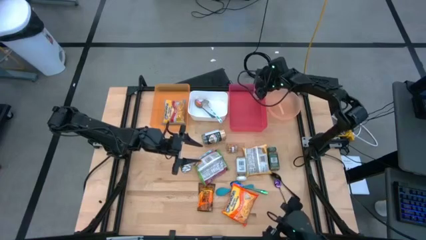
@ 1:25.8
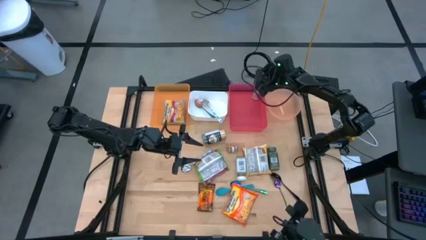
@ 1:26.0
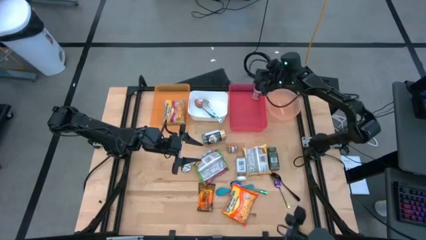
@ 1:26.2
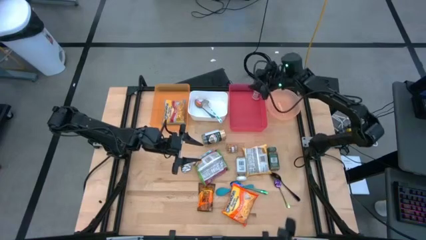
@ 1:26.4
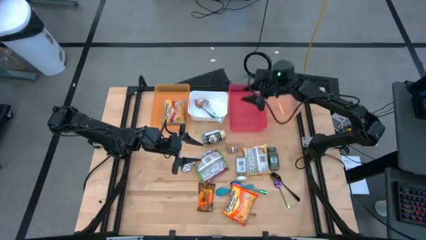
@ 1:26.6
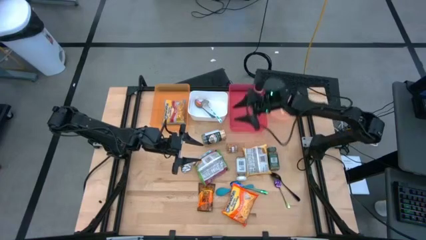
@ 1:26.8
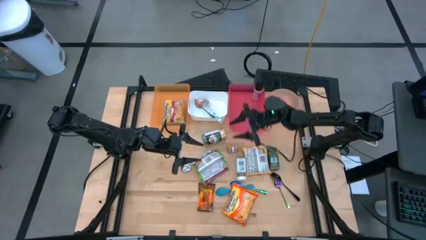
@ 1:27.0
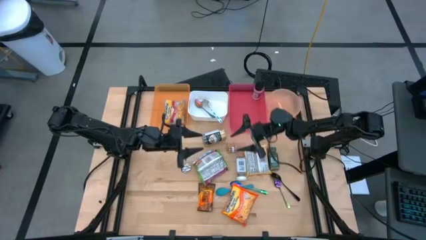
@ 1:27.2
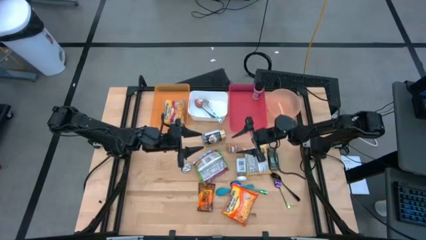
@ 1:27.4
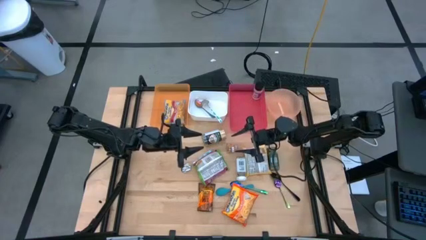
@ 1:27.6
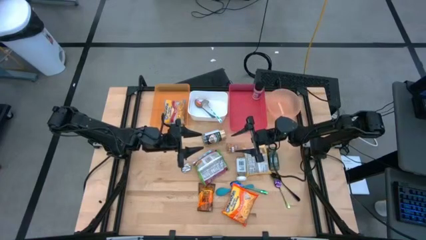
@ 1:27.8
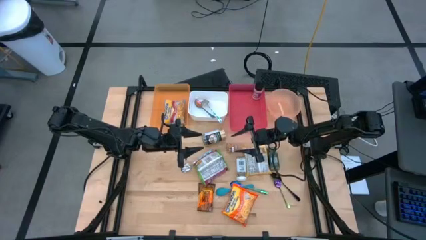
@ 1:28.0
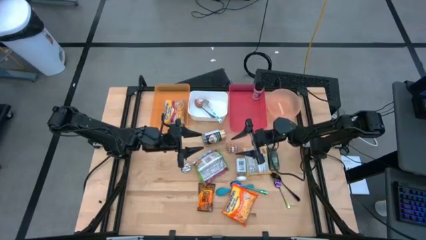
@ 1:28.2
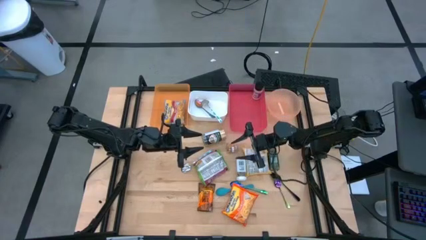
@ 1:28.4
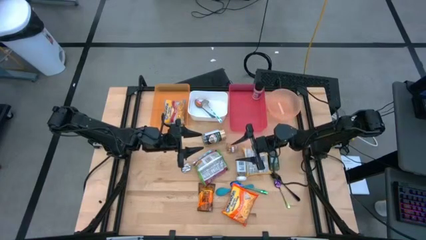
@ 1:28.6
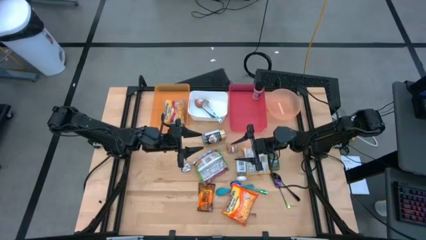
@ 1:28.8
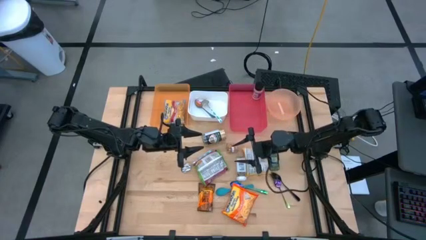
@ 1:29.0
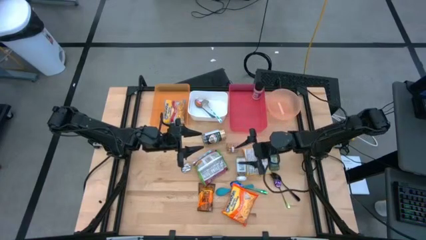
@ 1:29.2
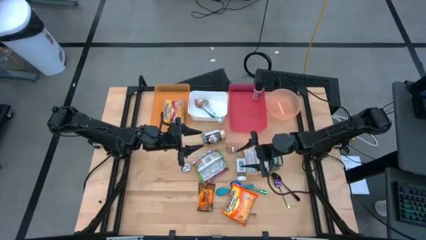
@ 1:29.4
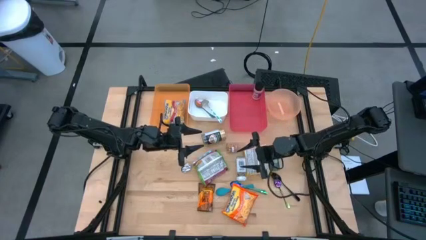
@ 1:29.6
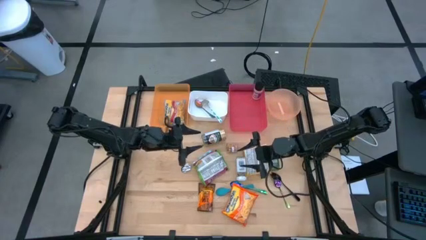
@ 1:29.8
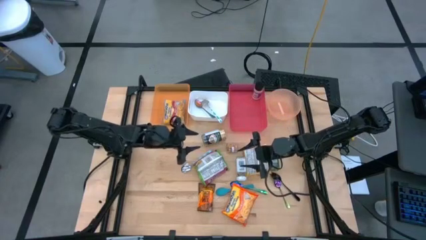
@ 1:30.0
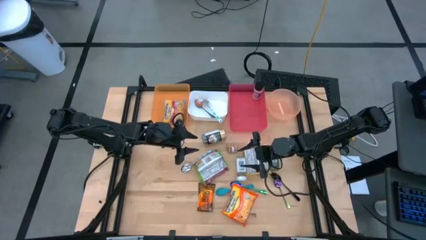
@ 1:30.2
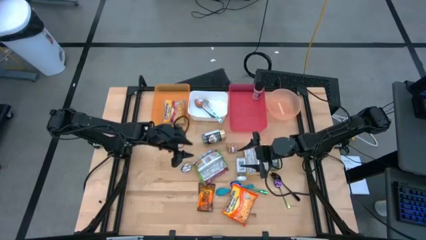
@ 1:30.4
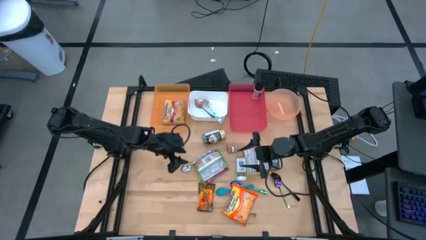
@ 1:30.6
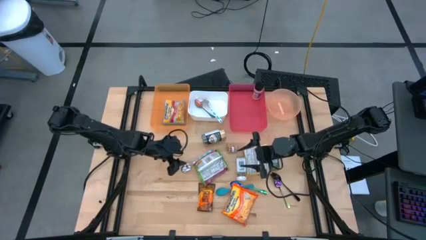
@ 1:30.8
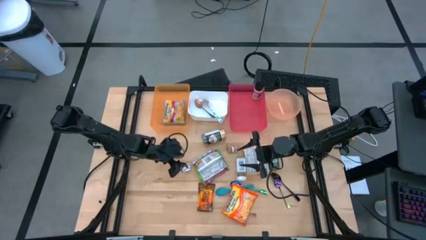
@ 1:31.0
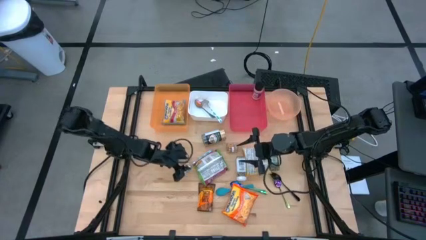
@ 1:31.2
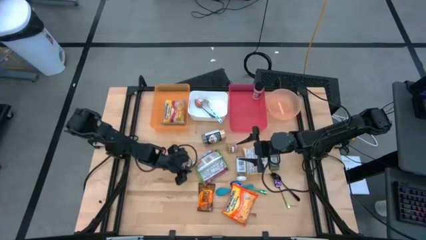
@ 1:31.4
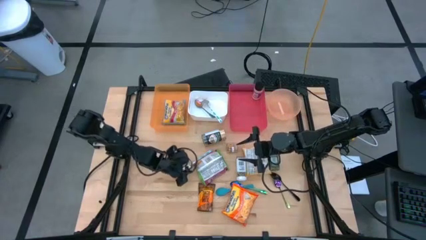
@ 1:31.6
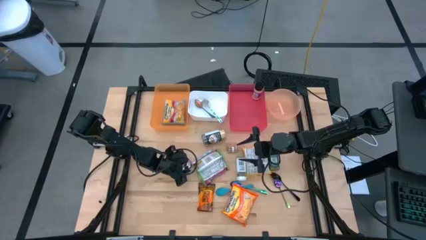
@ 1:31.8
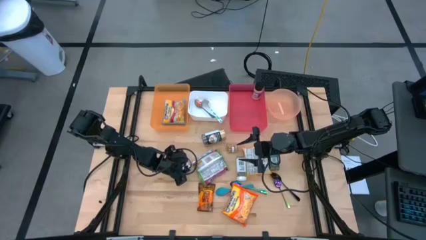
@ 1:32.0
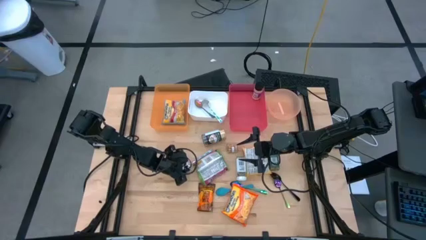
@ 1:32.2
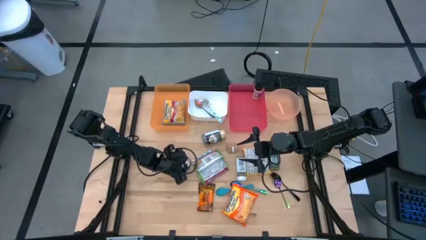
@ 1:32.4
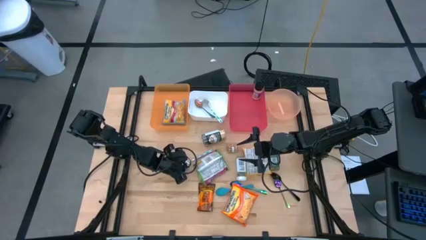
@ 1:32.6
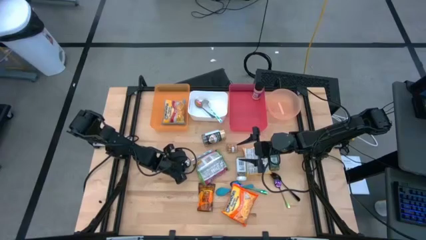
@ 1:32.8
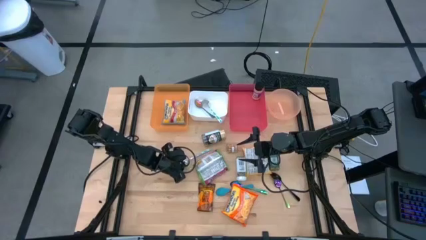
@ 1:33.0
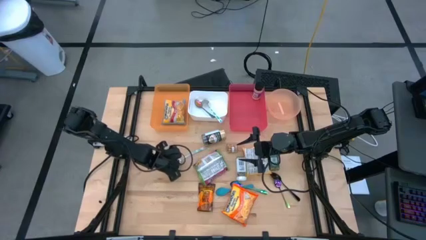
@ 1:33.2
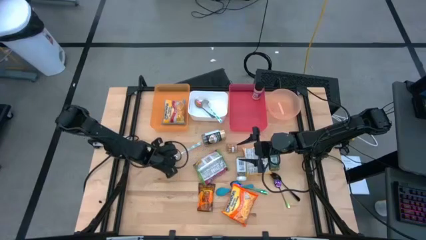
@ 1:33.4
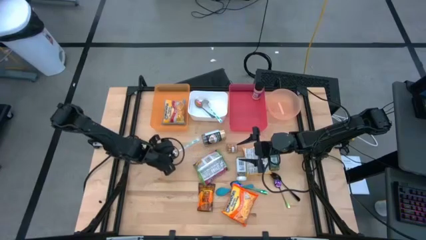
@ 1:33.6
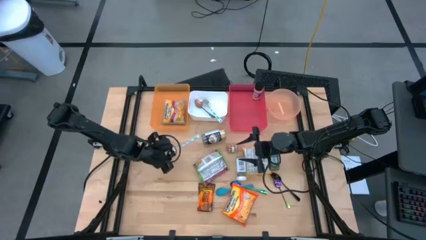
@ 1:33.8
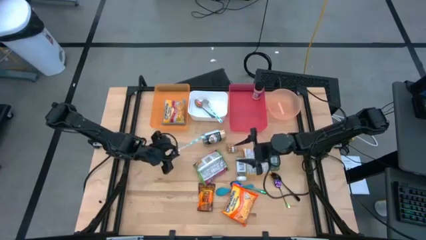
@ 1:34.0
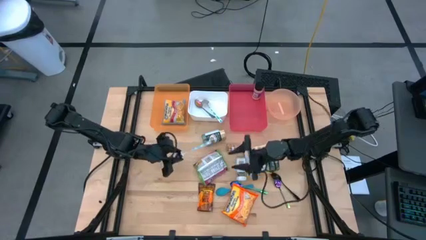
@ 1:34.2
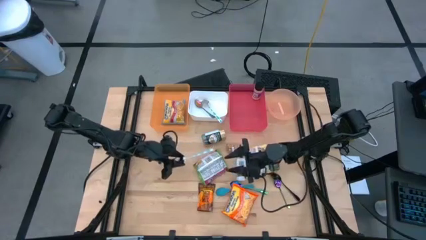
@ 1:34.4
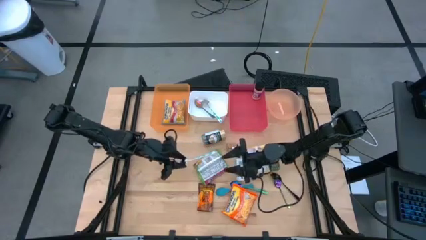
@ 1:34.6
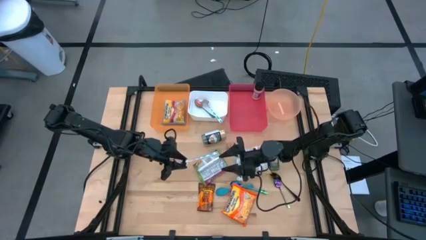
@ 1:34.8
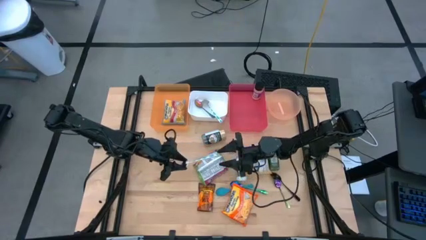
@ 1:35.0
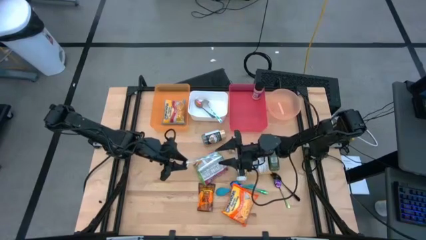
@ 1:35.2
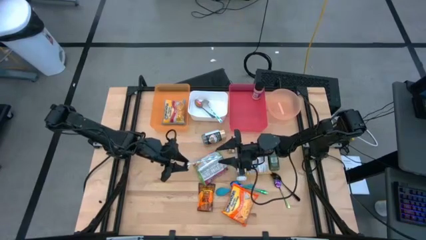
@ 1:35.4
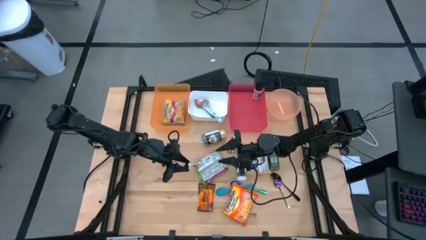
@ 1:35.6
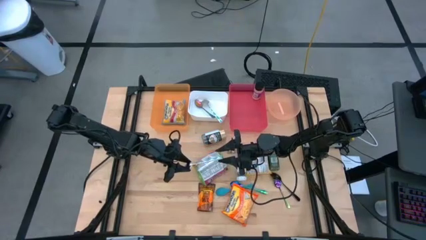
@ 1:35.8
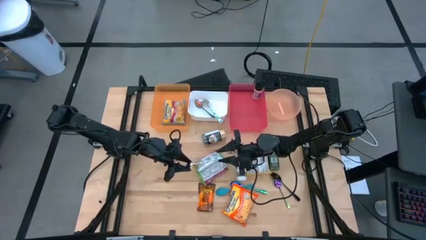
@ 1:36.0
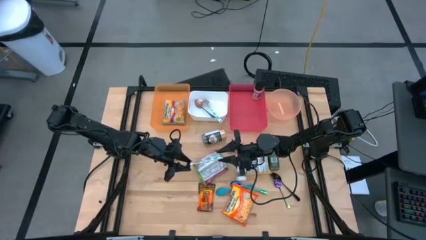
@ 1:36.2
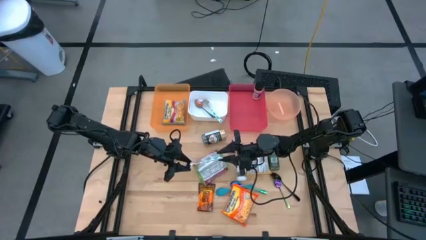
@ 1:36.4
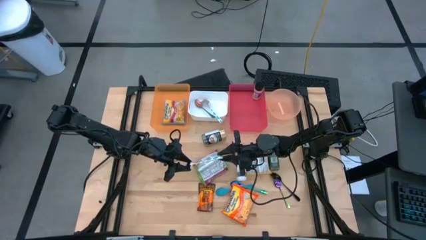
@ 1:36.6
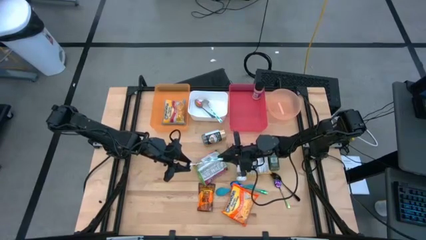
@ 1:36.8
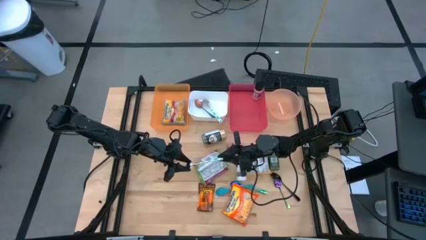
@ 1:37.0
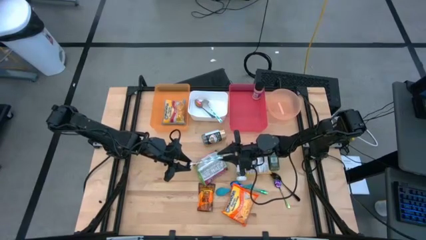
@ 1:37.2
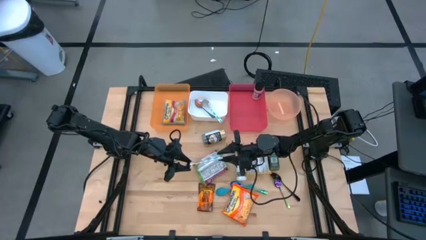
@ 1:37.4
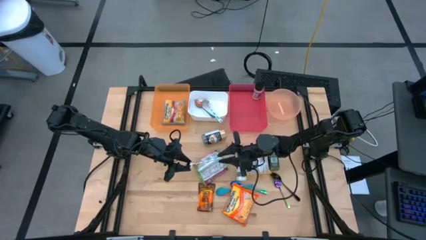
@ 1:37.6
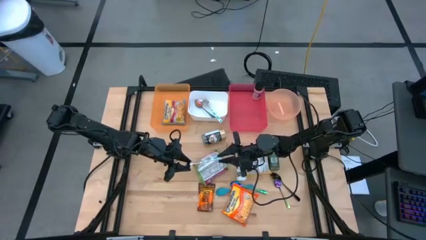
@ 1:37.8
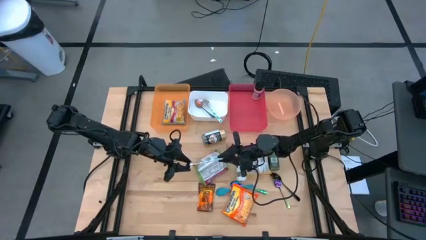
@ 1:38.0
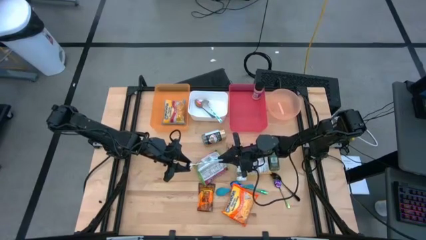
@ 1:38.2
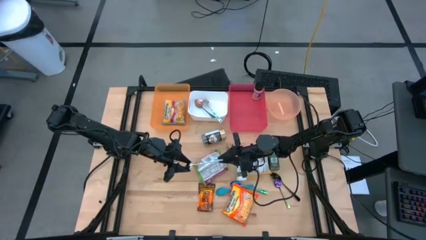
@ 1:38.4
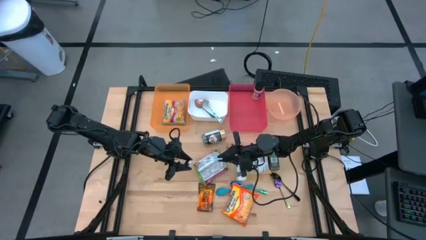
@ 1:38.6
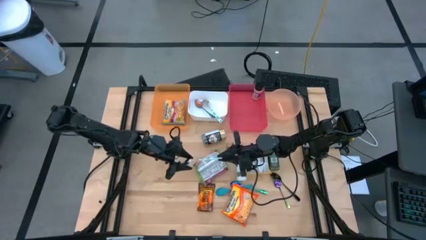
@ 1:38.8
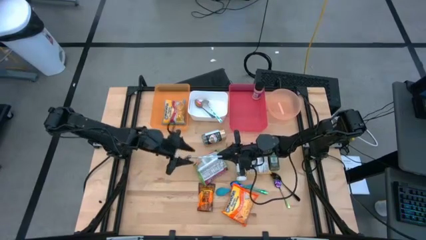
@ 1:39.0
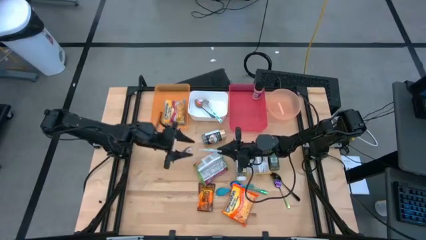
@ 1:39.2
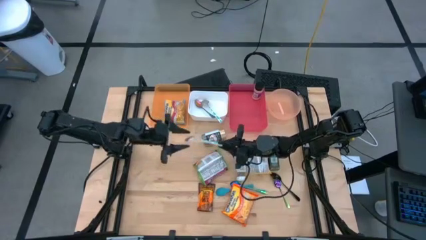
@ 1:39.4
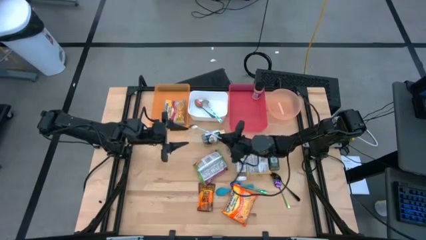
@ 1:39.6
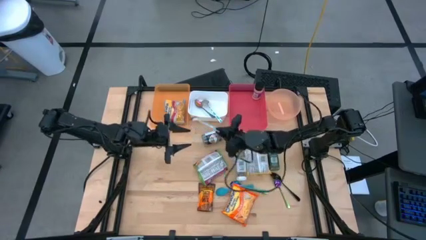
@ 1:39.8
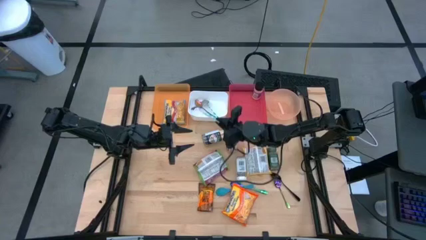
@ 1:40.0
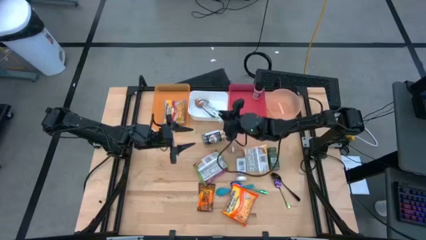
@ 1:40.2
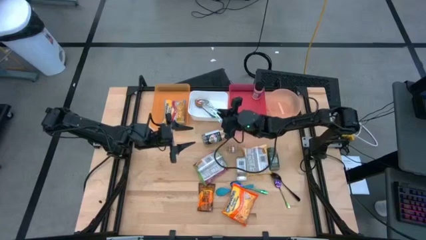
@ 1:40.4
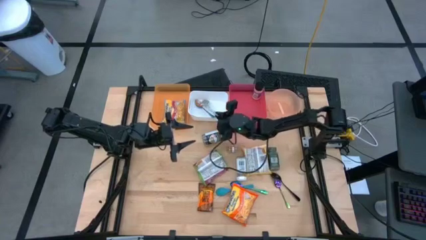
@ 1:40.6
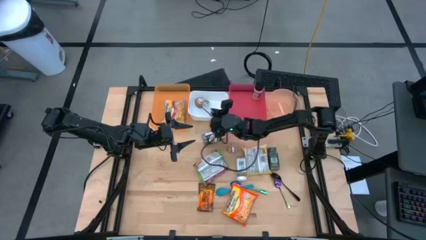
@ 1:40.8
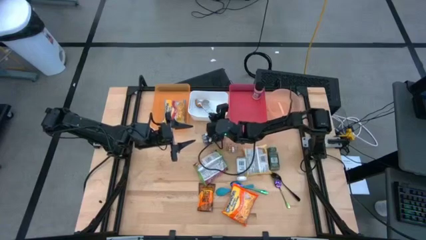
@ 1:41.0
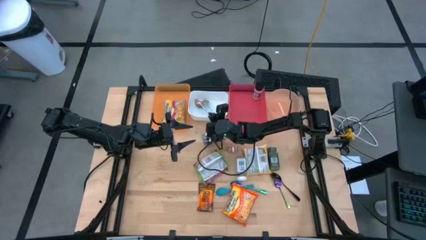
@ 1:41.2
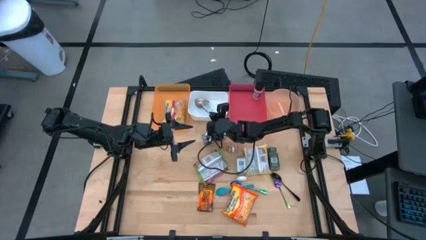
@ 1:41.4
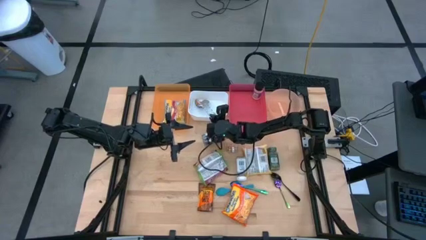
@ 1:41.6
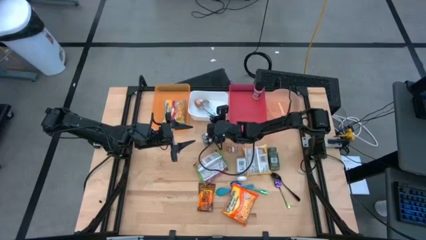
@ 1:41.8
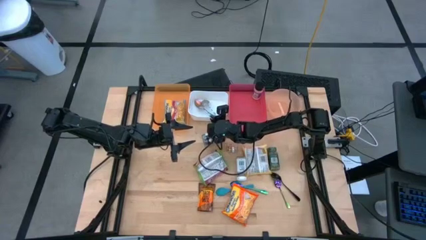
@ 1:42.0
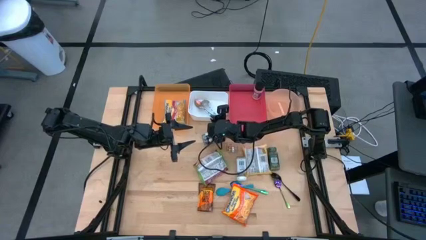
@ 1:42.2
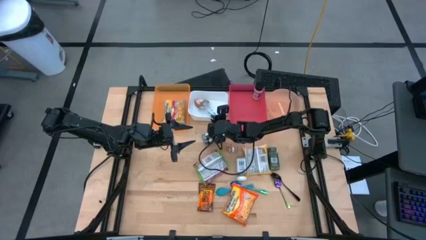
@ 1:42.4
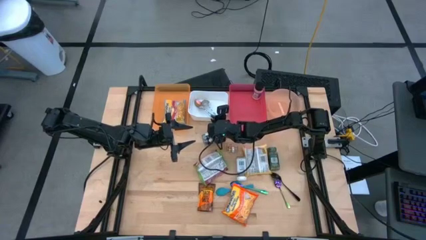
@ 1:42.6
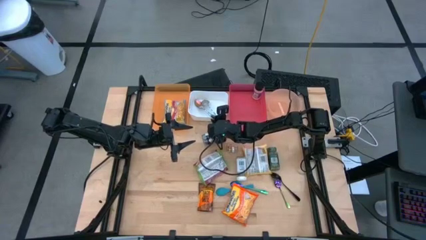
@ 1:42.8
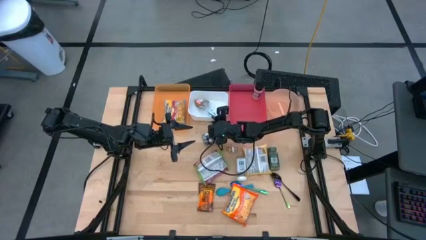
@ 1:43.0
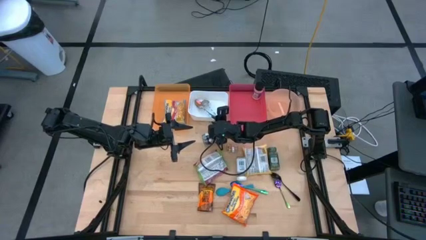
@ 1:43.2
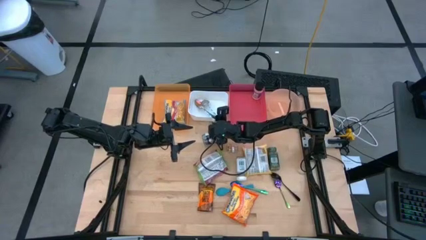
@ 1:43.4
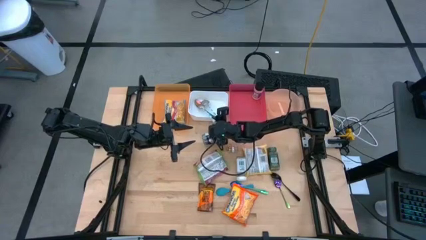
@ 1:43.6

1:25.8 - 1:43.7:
Task: Pick & Place Food Item
Put the blue patterned spoon into the white bin
